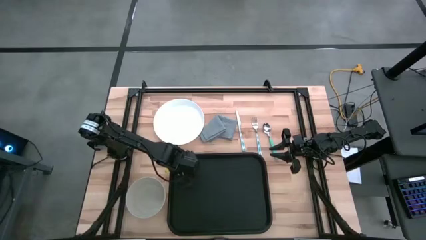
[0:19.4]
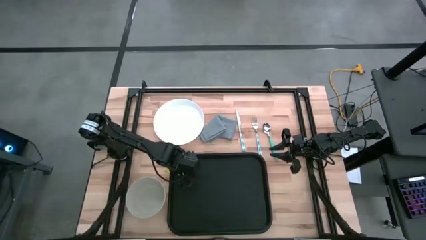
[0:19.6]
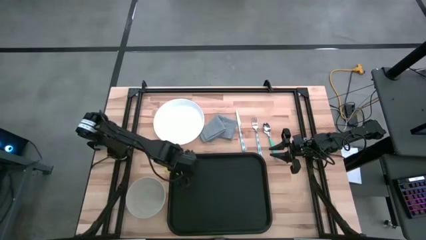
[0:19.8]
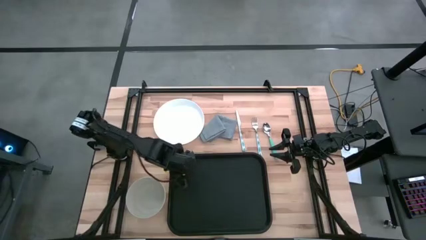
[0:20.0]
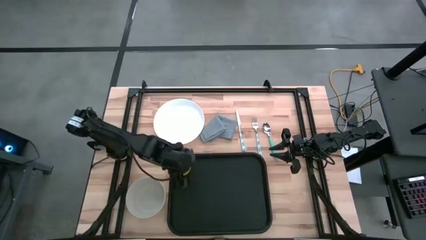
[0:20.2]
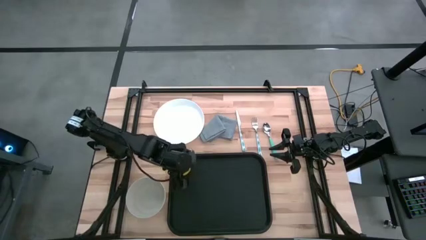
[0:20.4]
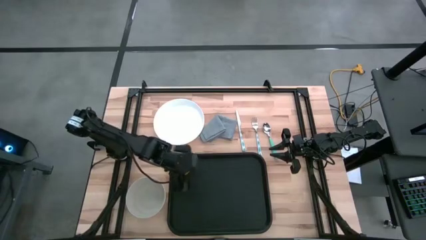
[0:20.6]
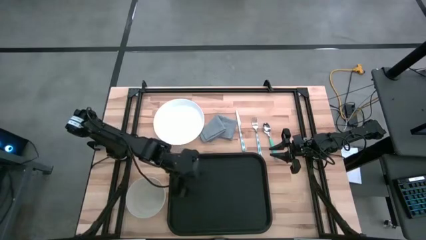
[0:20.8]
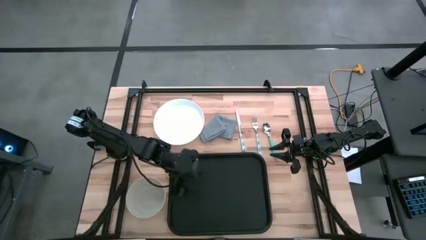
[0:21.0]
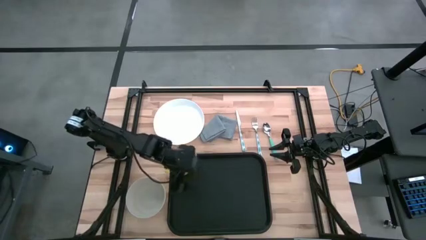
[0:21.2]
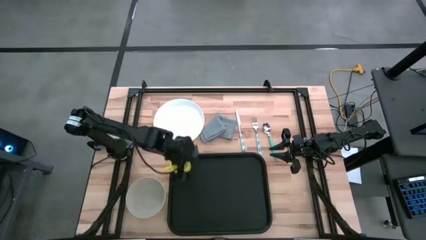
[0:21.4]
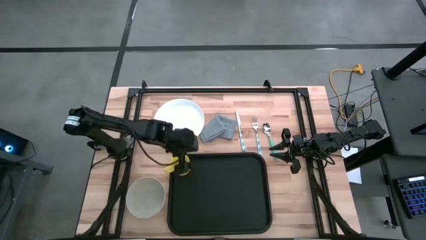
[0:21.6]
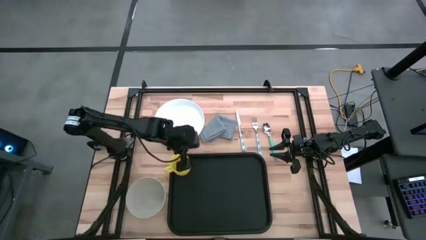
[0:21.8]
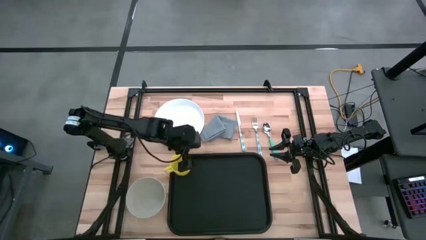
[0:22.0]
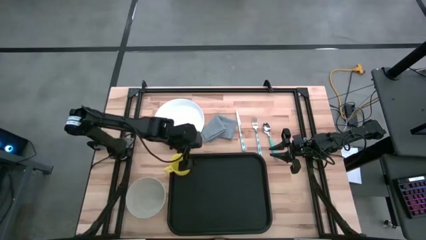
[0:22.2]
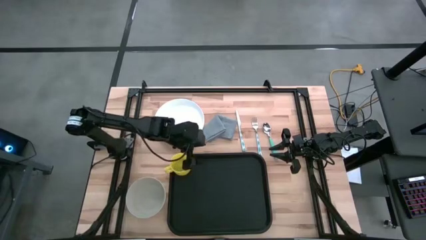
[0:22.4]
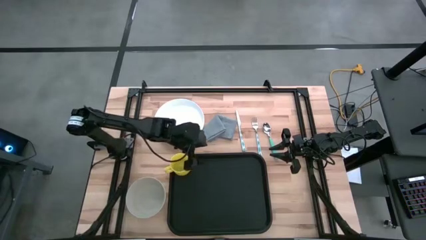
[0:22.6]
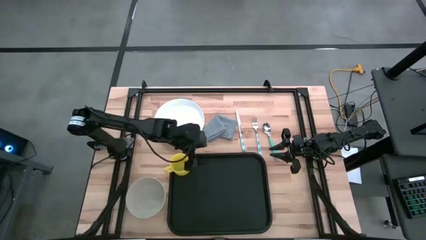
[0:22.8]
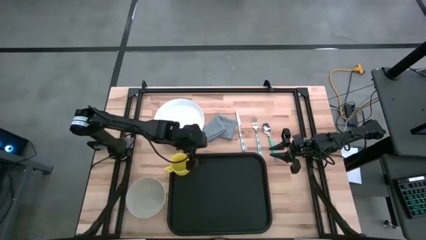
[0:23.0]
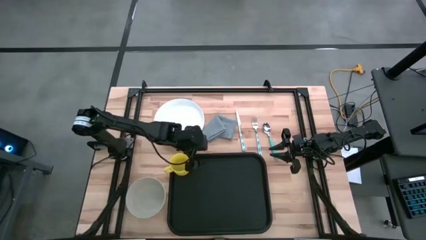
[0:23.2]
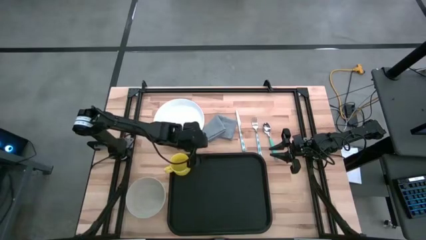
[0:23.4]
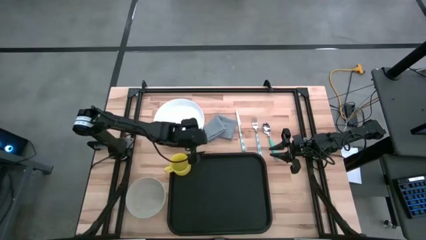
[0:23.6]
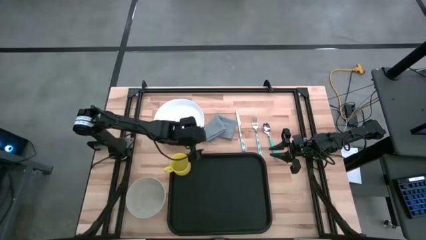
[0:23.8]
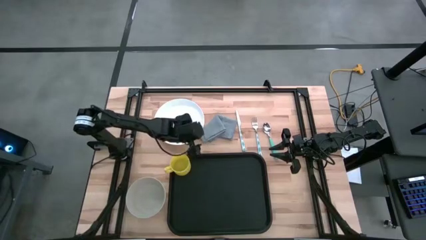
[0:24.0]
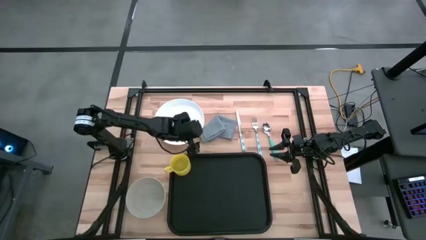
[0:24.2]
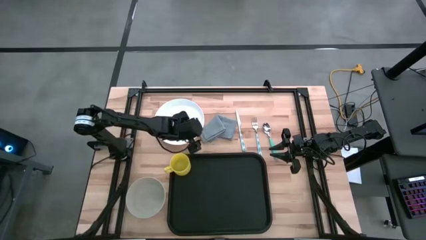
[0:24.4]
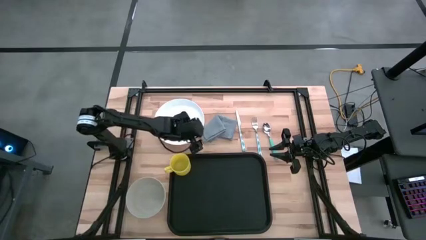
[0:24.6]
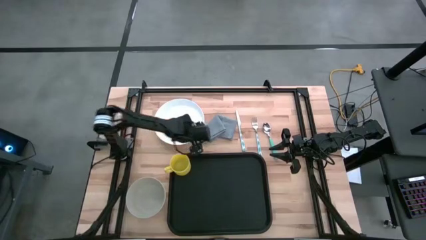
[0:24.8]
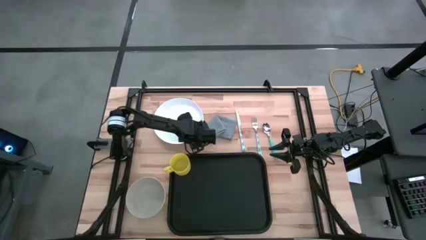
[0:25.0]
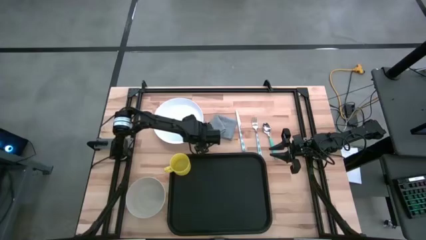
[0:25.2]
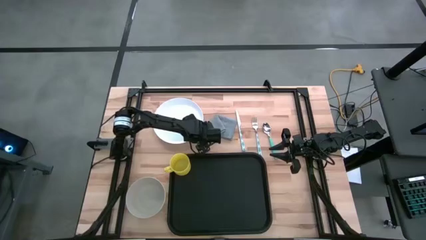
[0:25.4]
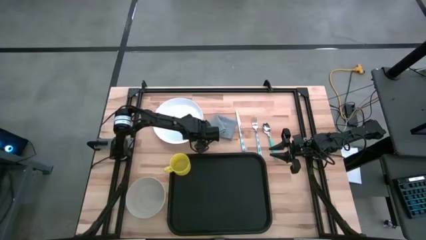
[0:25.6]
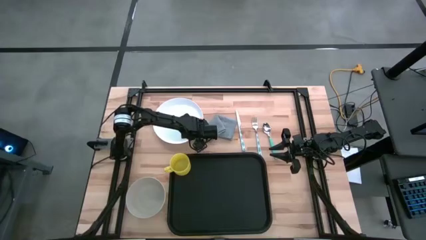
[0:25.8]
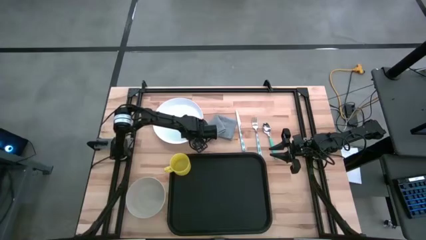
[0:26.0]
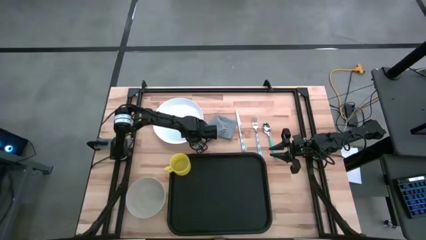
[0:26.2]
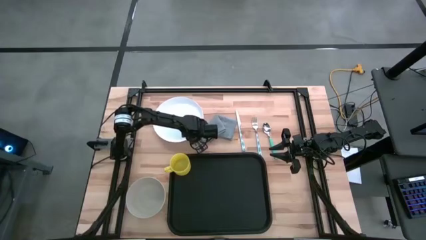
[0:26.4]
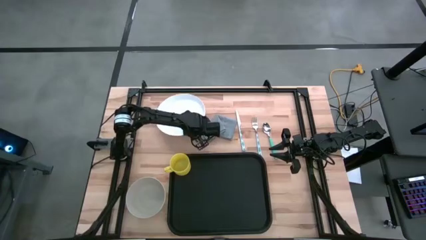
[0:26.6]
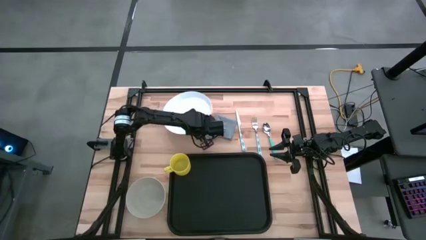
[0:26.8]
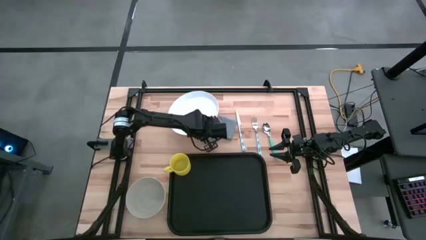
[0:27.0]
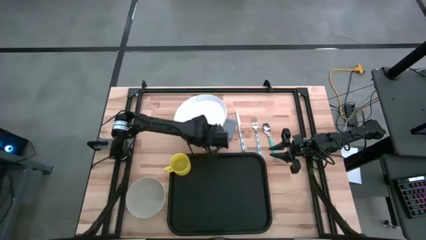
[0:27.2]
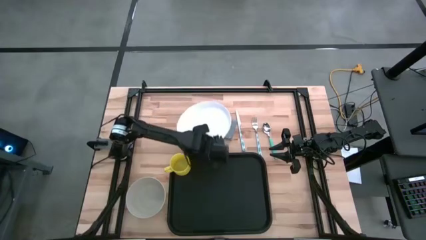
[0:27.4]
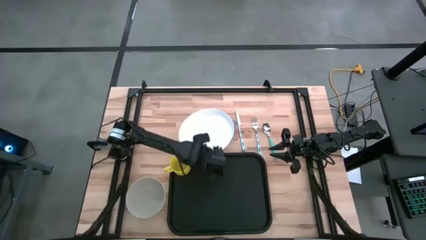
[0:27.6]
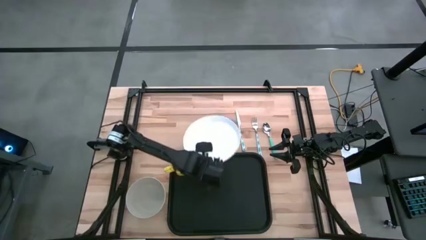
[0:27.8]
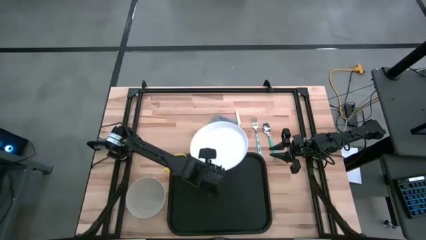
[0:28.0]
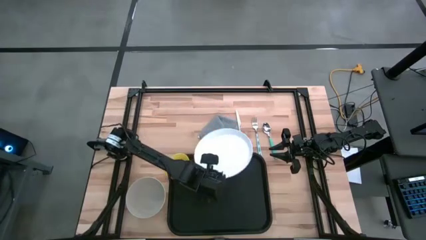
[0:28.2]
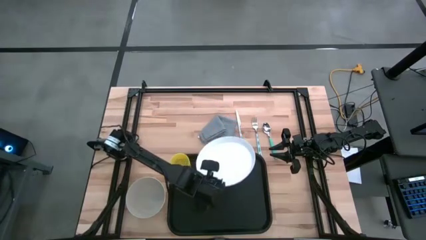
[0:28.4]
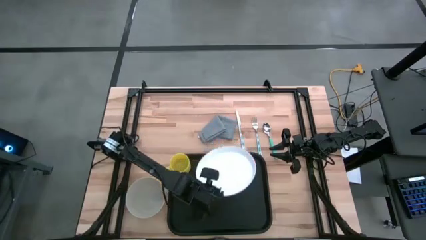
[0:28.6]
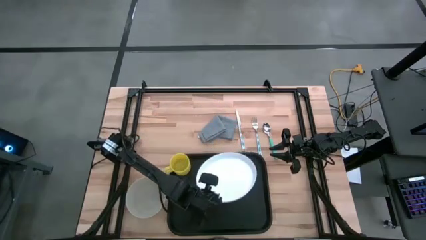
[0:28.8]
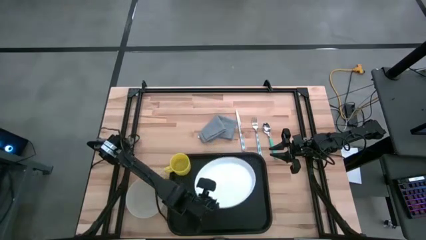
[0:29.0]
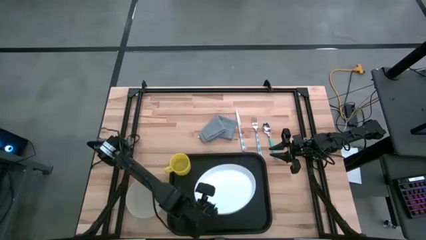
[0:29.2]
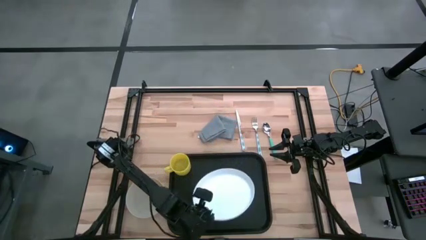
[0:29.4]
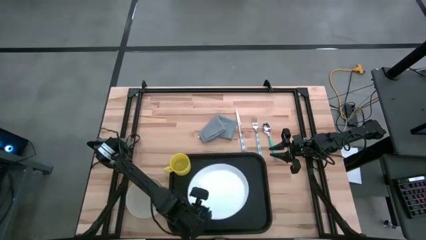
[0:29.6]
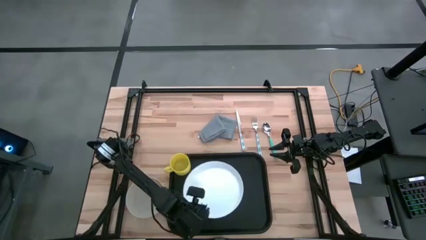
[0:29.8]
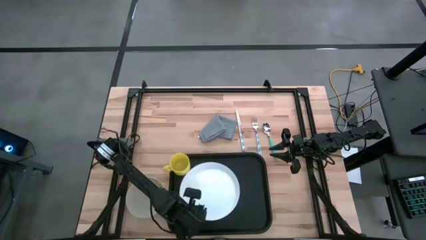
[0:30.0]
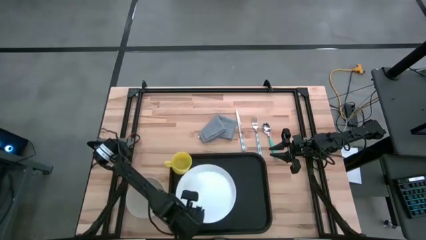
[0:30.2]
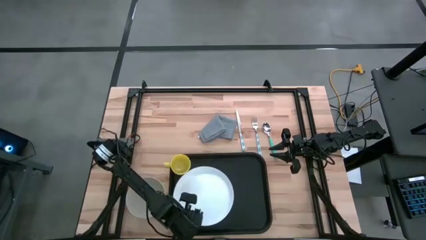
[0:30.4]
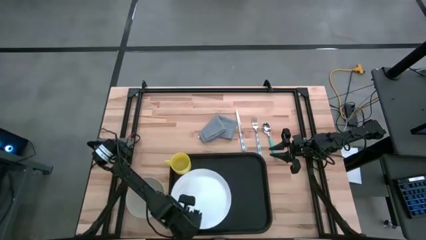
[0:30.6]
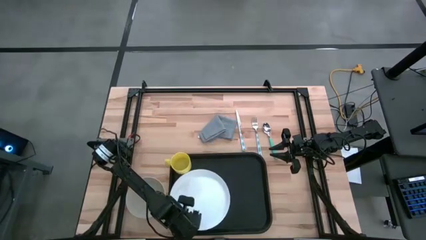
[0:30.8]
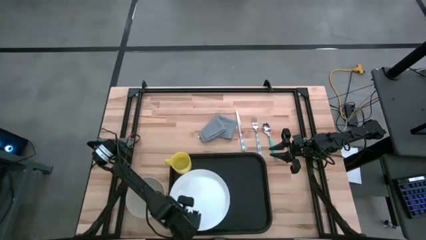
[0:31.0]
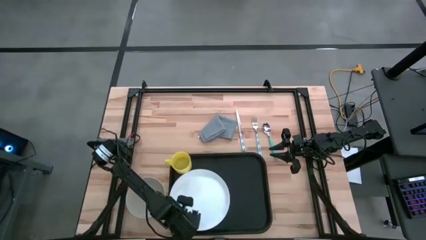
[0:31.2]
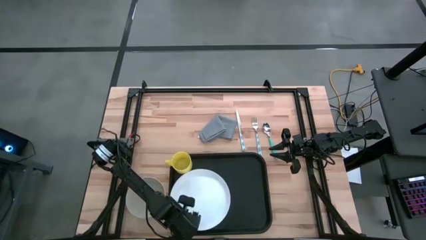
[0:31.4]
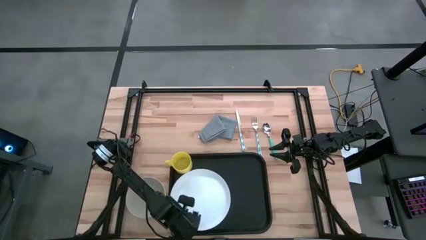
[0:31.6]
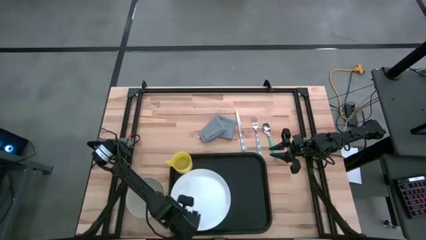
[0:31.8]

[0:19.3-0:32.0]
Task: Set up tray
Put the white plate on the black serving tray below the yellow mug

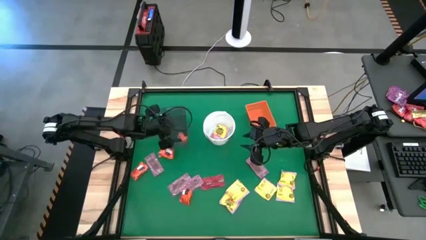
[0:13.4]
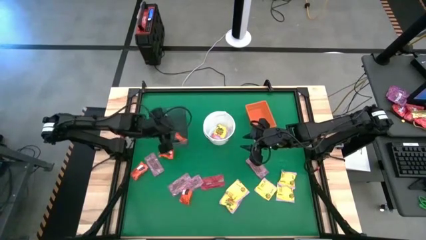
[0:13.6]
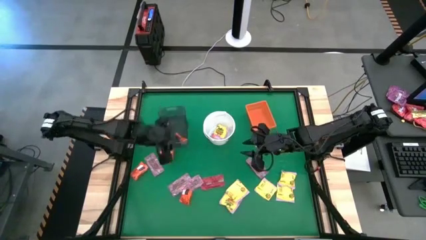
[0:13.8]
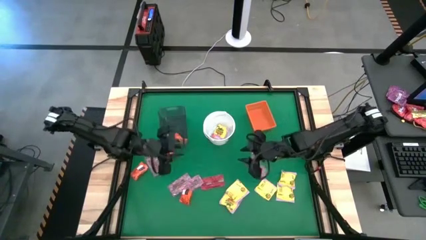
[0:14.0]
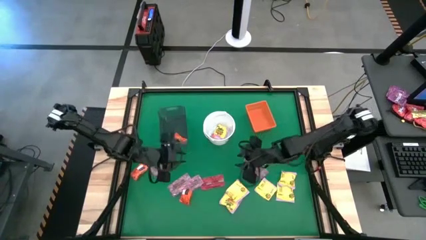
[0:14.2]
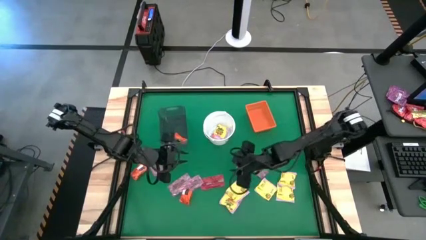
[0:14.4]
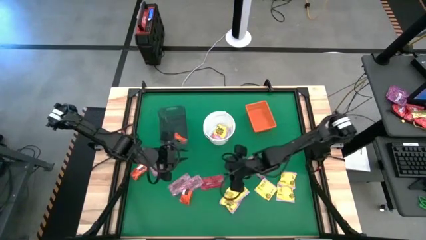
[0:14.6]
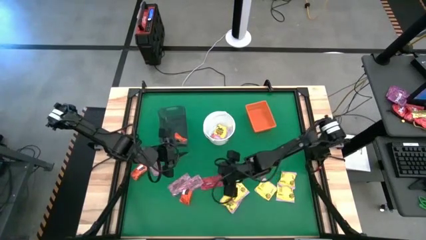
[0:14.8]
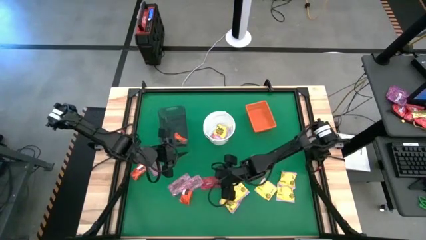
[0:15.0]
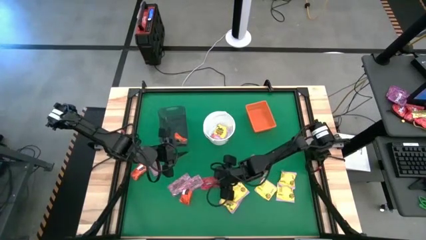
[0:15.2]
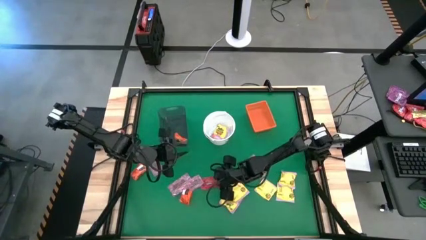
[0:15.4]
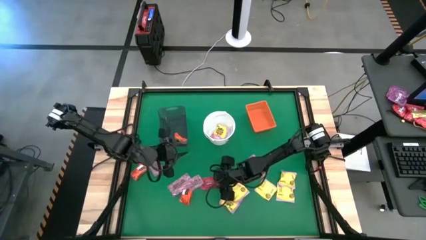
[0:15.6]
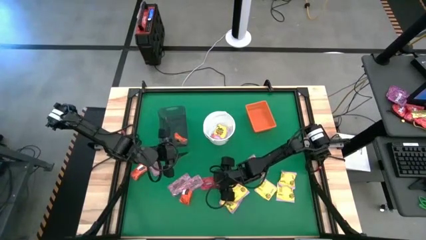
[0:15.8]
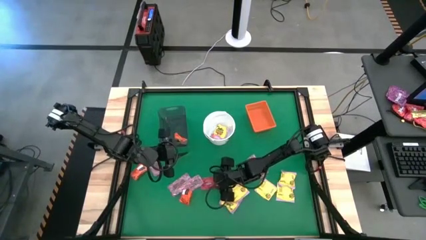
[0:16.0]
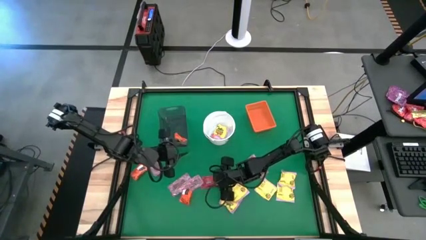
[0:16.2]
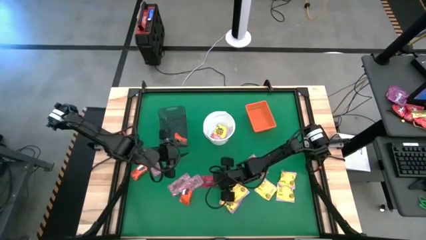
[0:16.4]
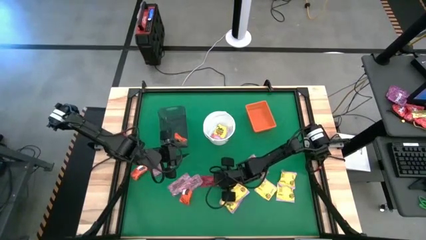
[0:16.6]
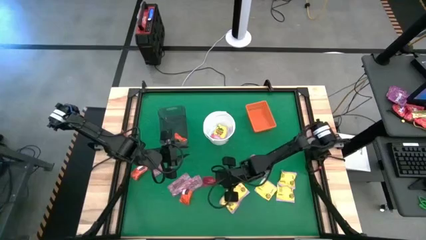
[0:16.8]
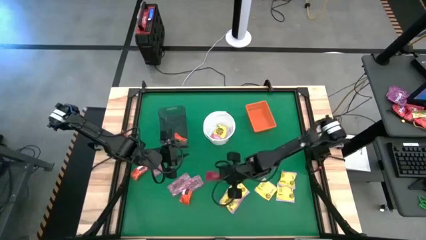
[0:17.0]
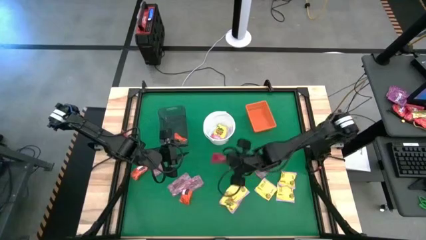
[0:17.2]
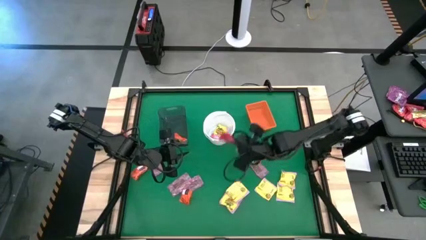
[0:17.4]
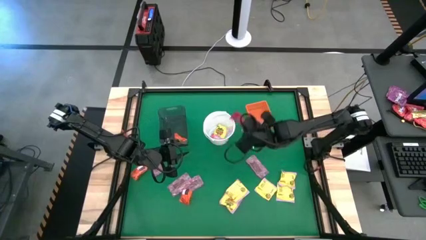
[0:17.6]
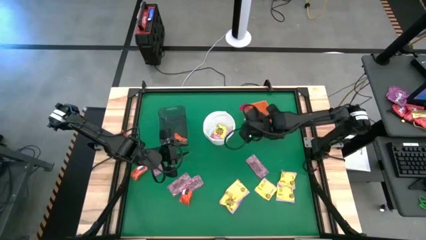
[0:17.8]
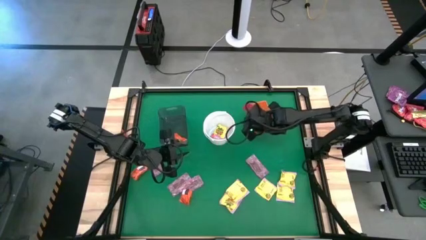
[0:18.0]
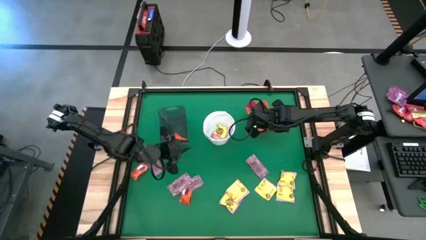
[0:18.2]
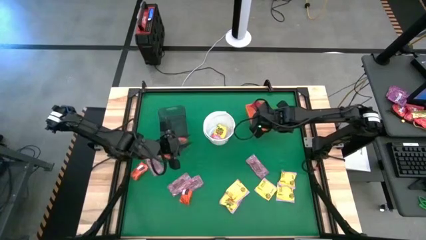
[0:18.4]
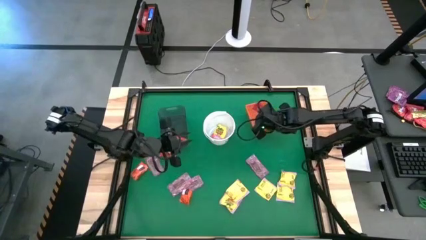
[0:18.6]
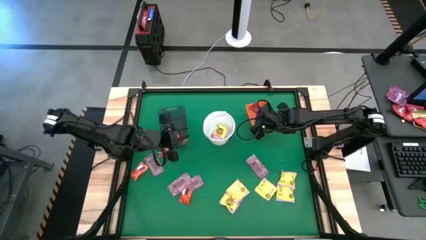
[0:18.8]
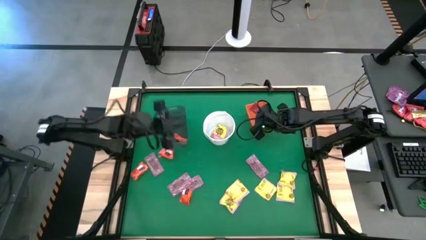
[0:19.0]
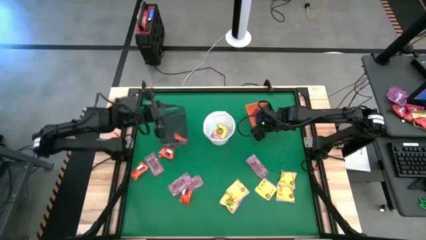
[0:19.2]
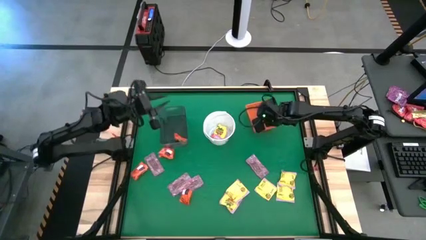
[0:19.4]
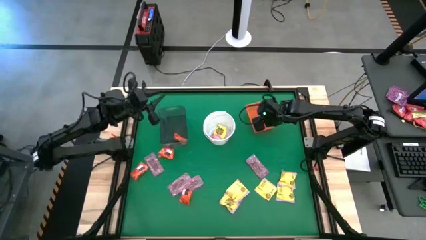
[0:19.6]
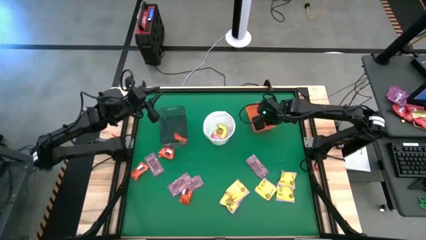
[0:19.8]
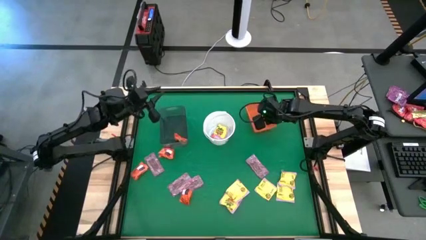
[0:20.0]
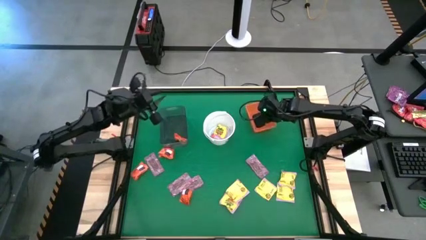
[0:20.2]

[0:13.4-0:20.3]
Task: Sort candy by brand, put in halloween buckets
Put the red candy into the orange bin
